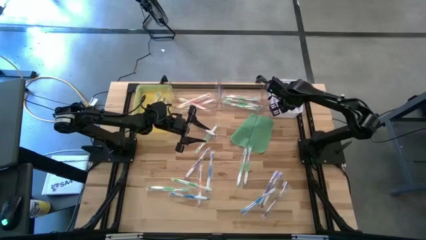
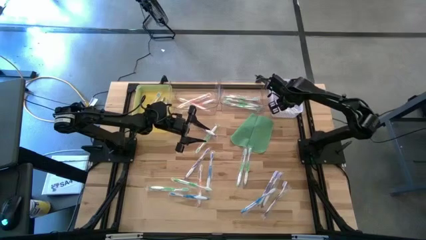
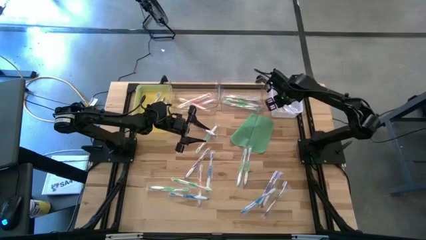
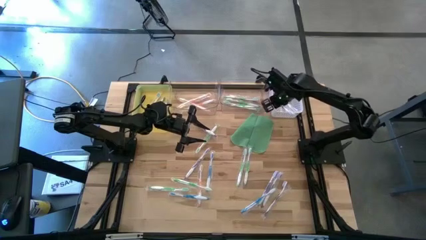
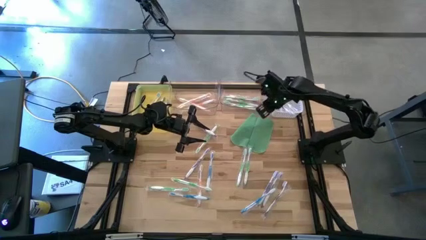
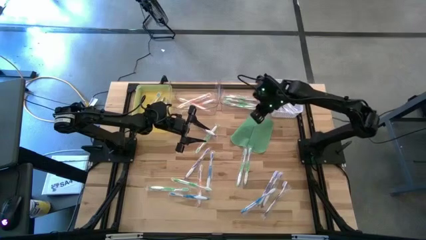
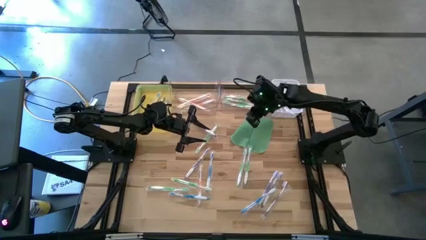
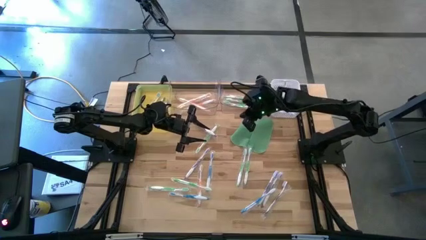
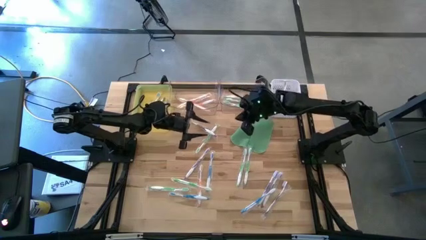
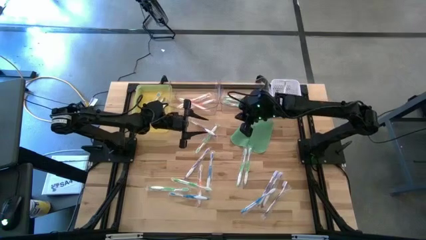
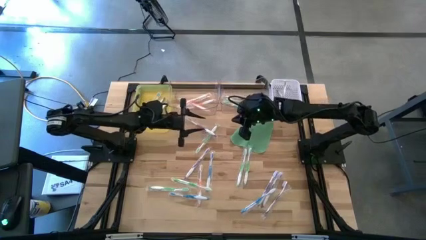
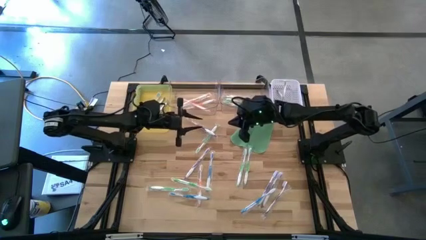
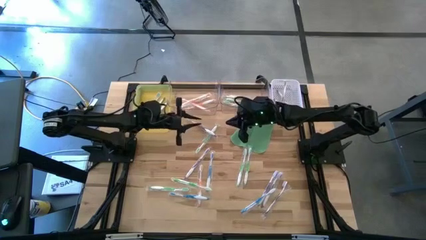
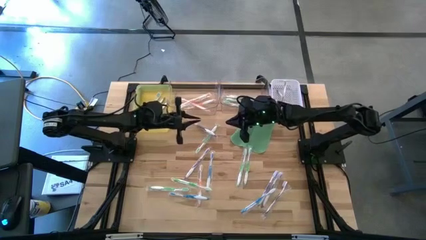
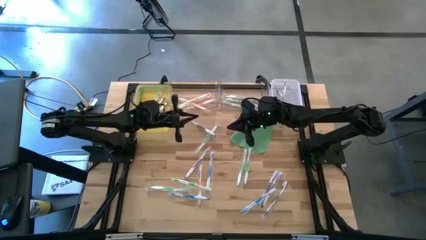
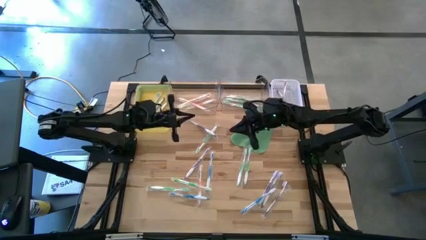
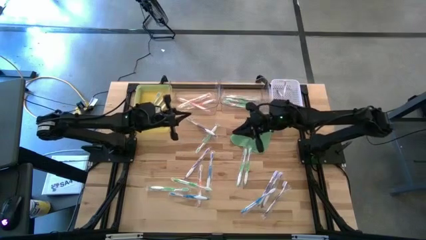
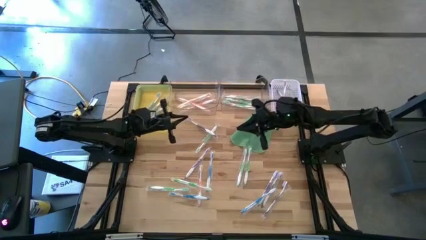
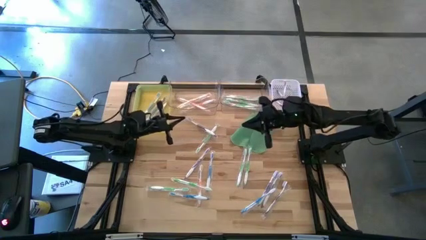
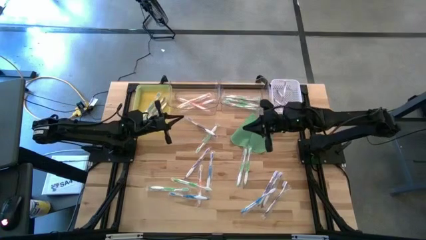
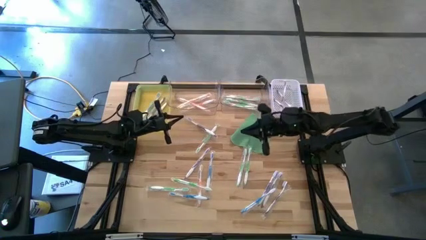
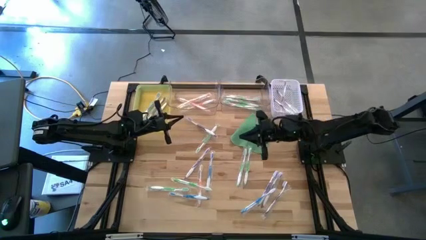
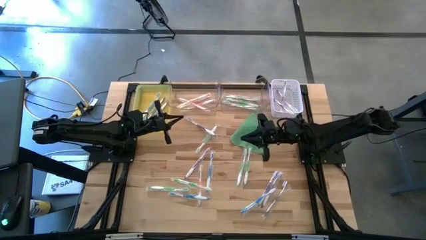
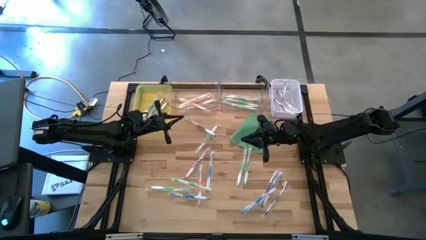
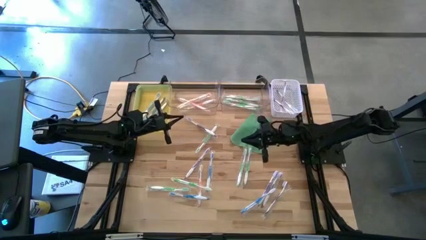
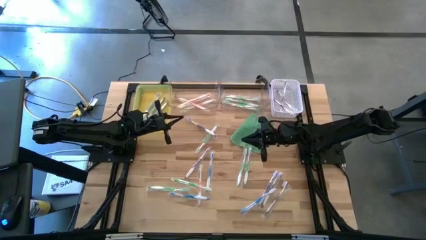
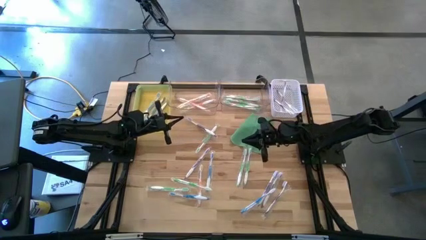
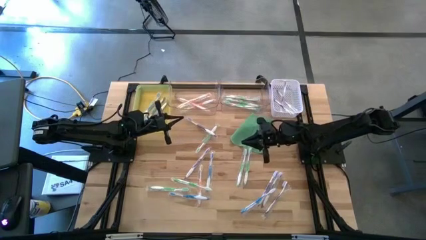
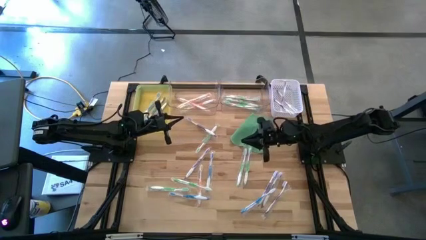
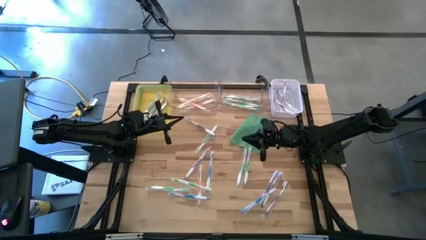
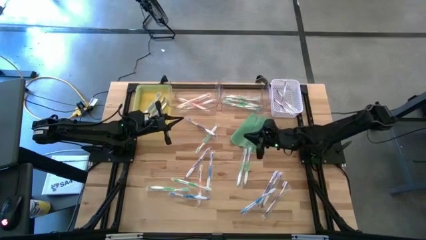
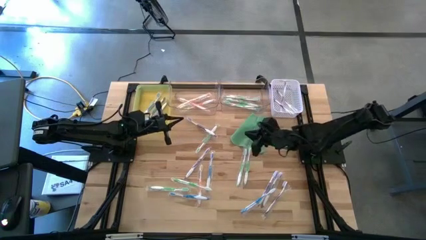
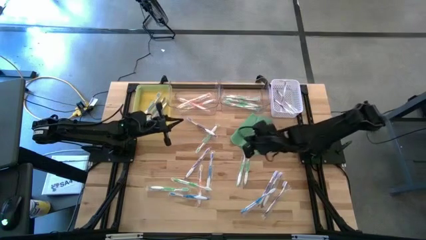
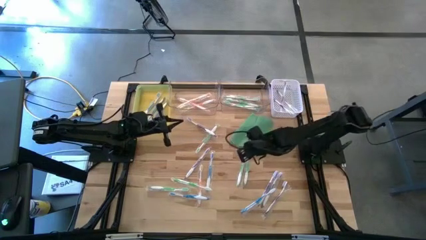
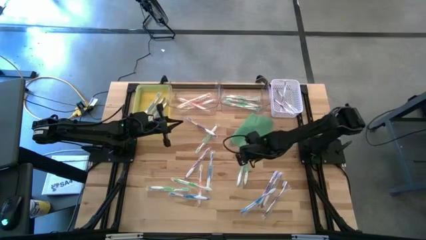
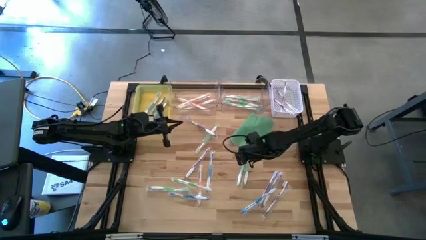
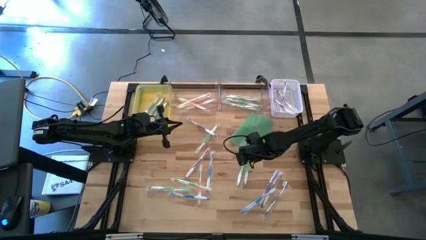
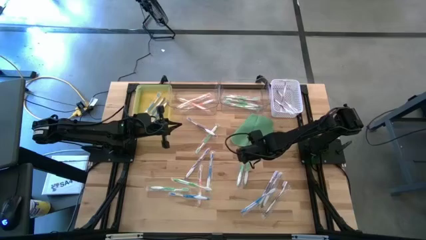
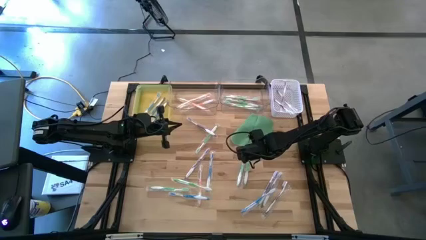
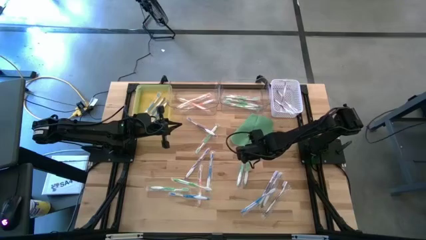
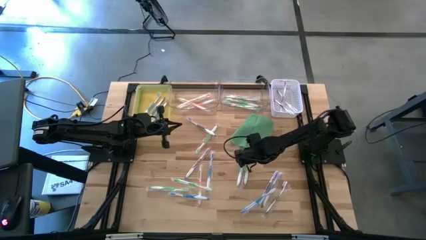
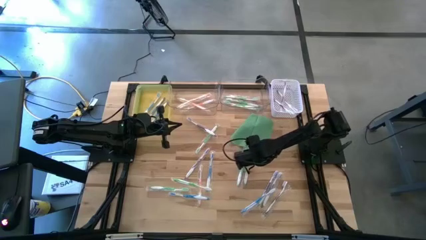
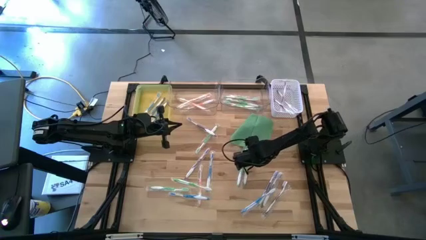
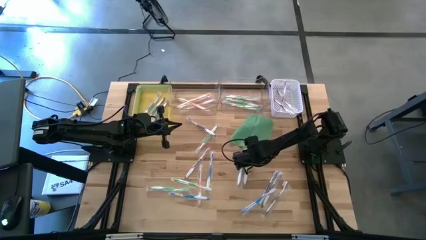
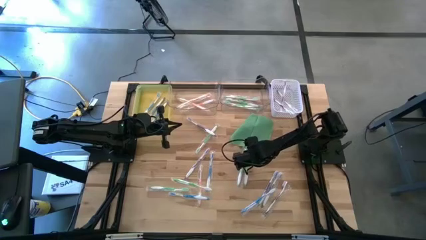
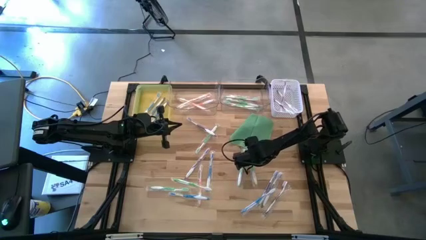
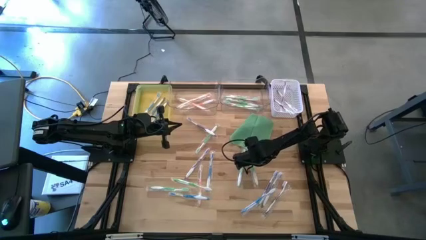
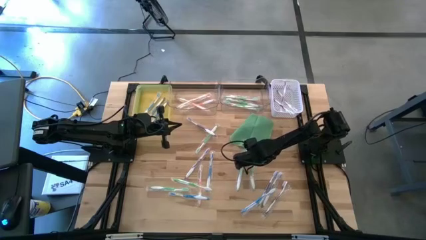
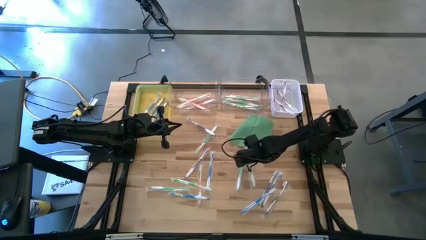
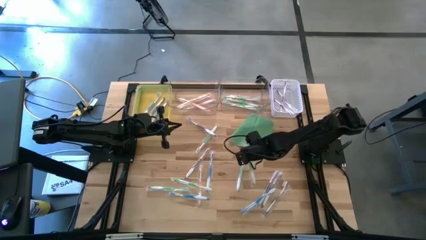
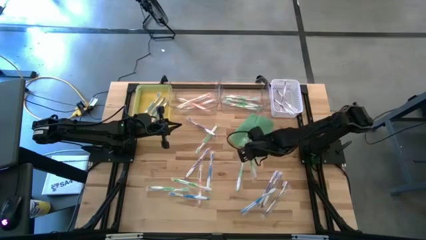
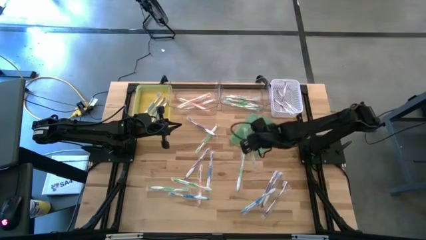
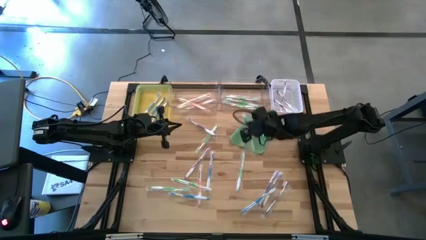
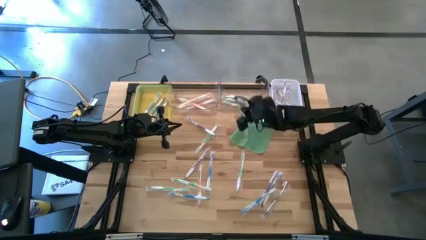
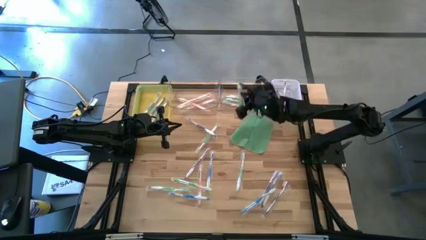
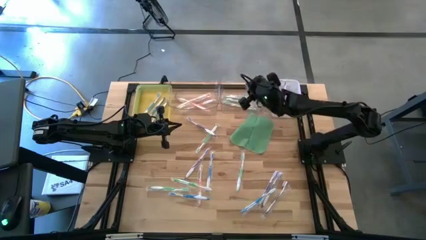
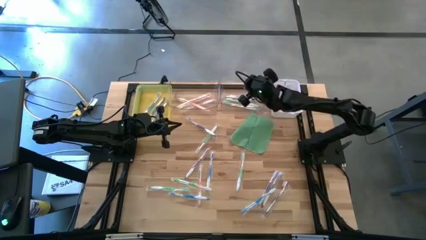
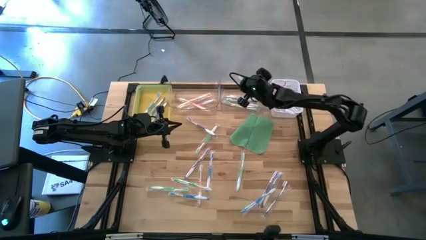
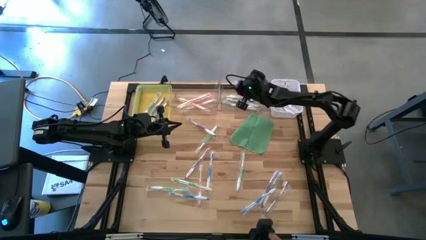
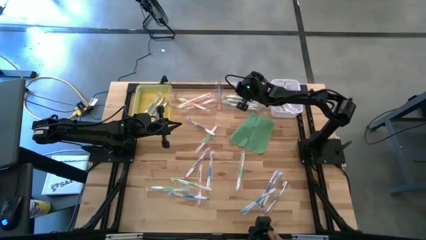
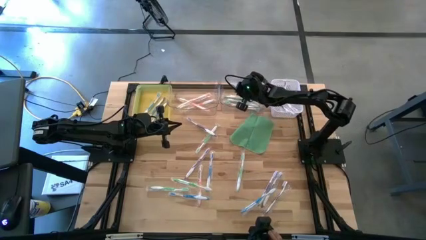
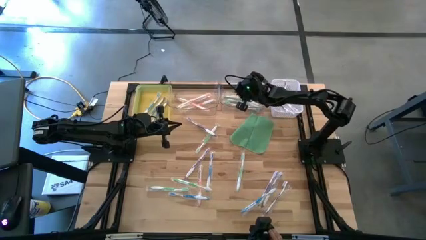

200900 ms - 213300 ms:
Task: Pick & Place Toothbrushes
Put the green toothbrush into the right transparent bin

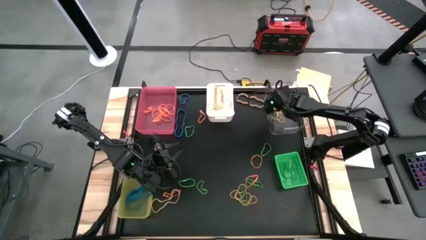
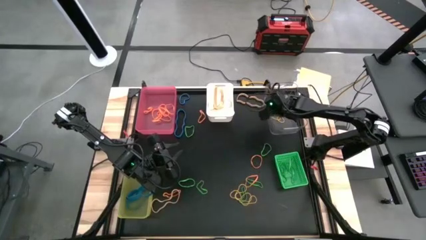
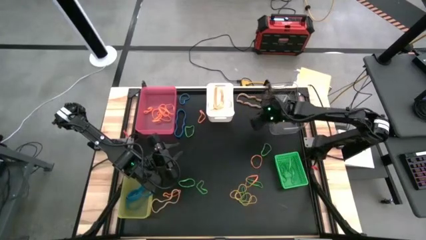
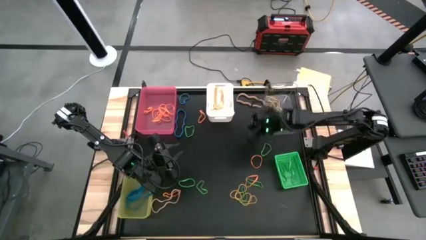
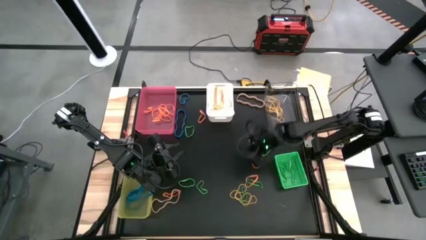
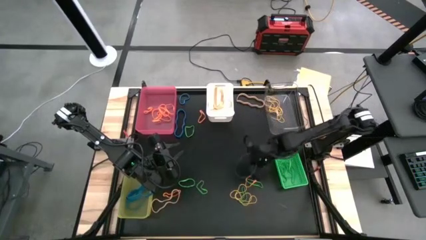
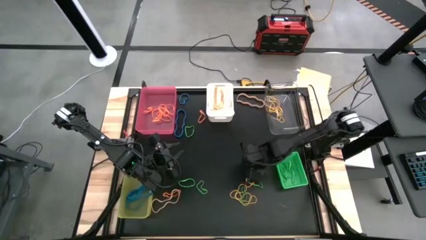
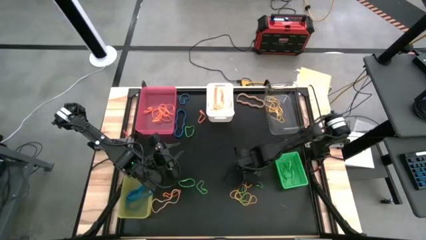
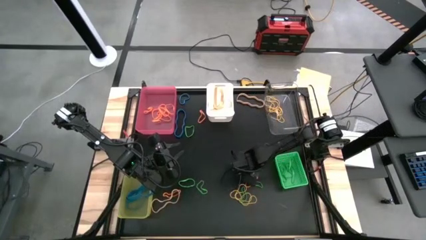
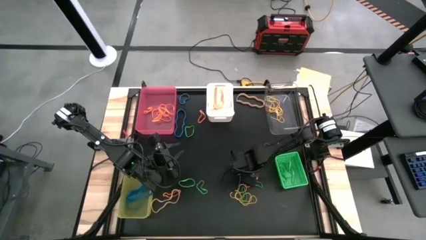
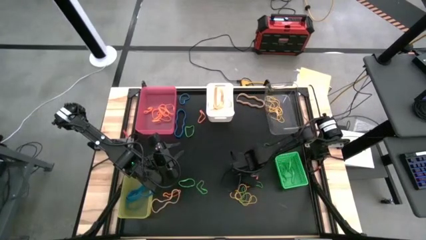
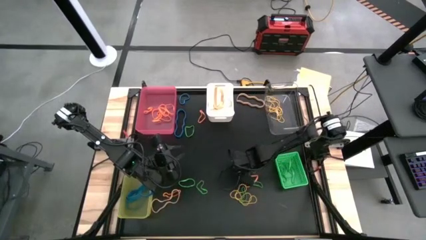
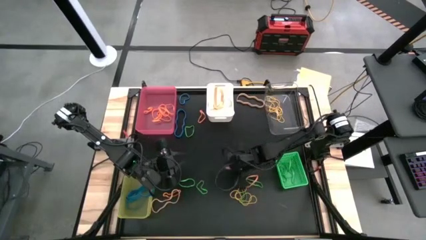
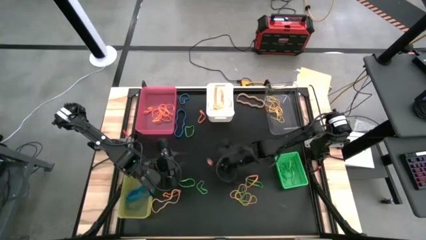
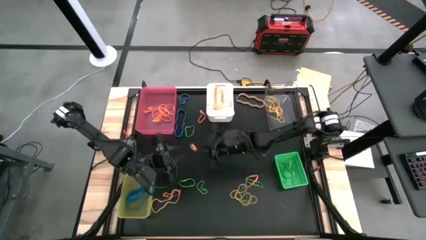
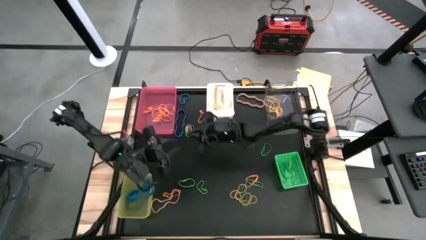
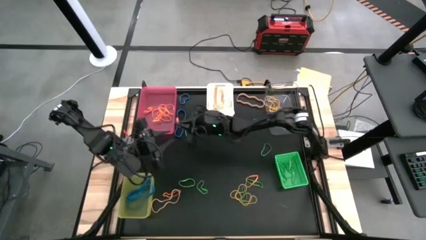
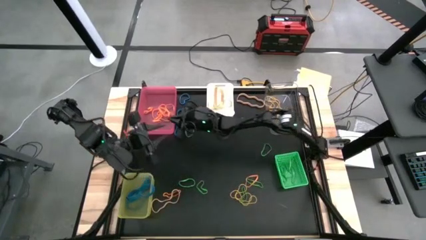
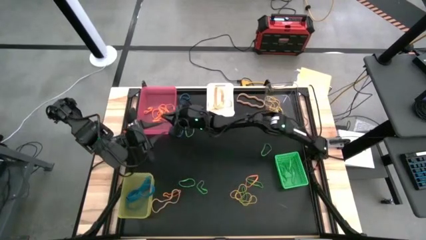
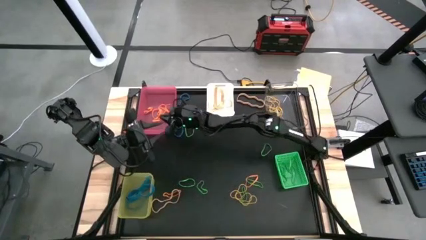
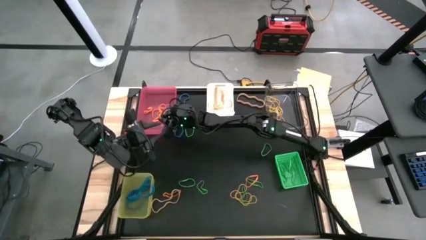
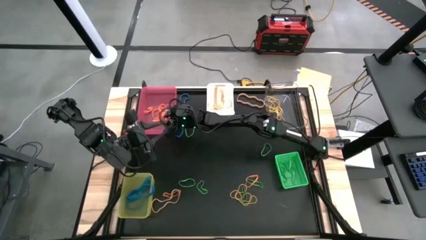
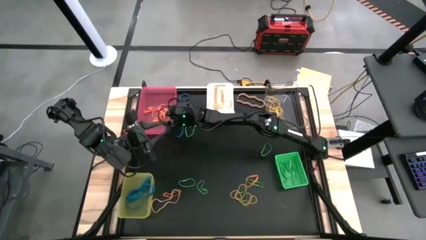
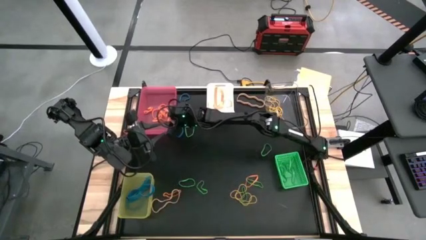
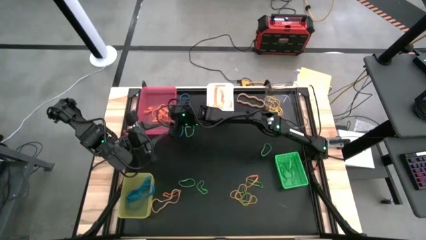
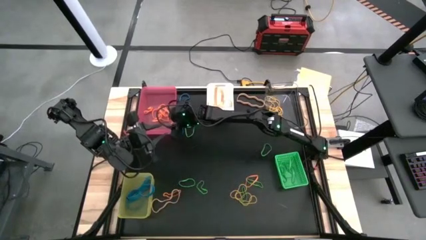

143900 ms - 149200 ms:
Task: Sort rubber bands into baskets
Put the orange rubber band into the pink bin
